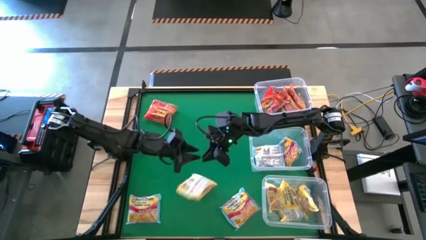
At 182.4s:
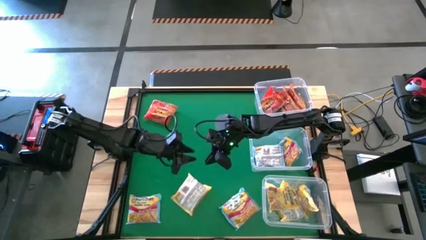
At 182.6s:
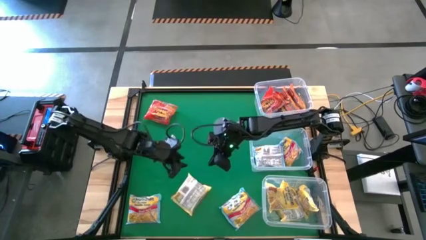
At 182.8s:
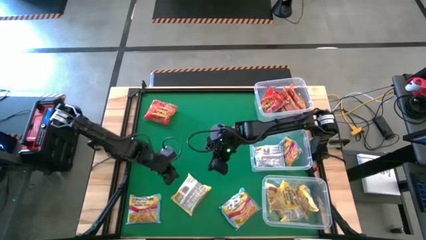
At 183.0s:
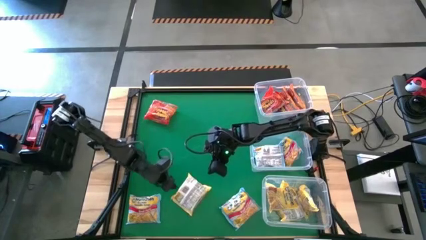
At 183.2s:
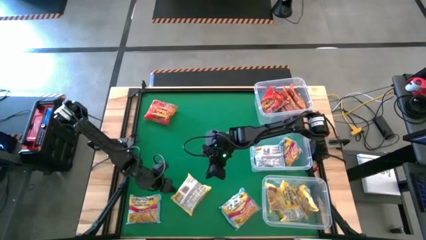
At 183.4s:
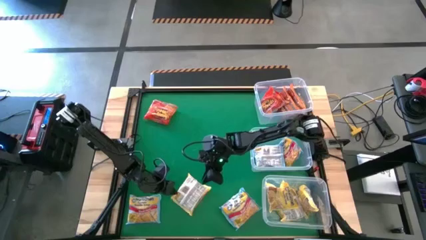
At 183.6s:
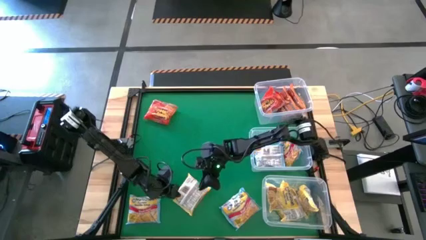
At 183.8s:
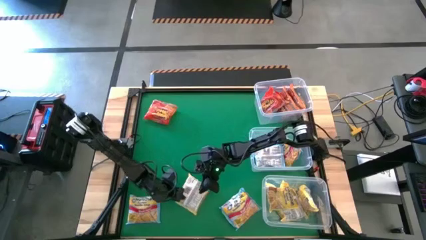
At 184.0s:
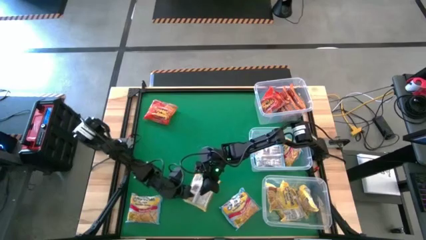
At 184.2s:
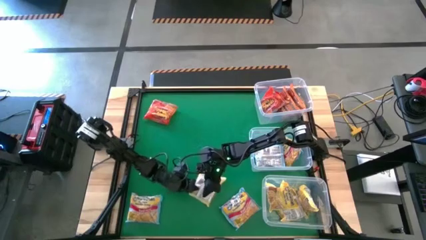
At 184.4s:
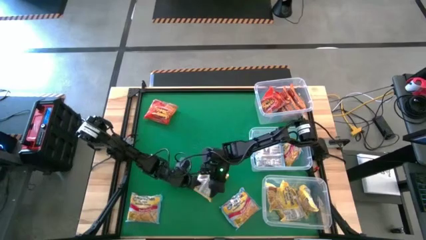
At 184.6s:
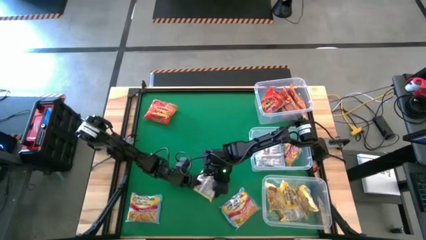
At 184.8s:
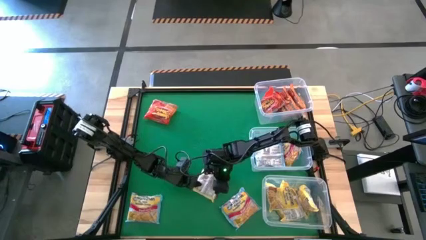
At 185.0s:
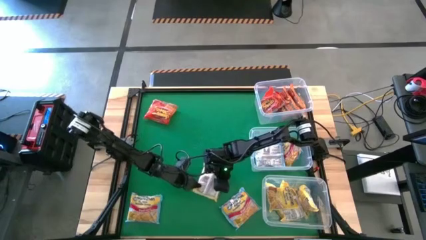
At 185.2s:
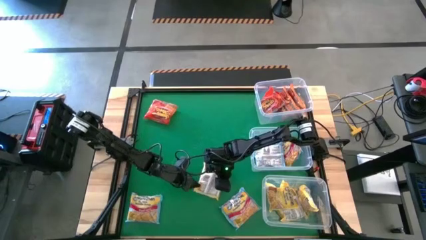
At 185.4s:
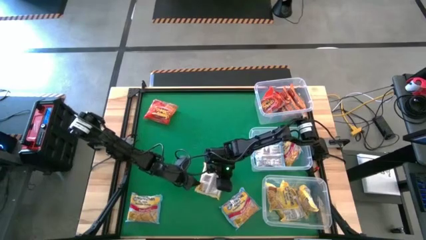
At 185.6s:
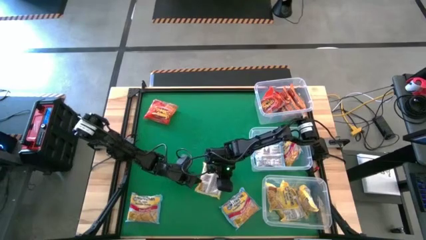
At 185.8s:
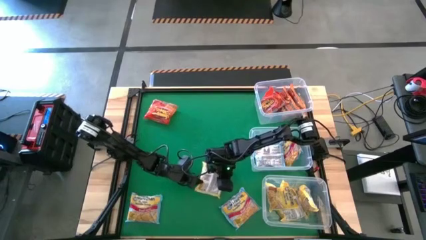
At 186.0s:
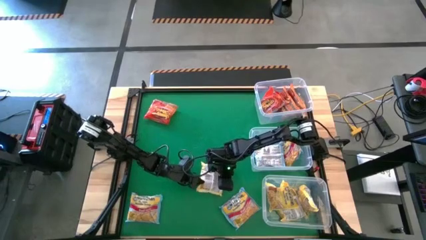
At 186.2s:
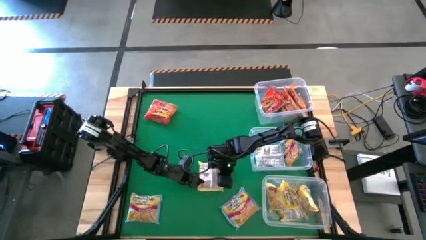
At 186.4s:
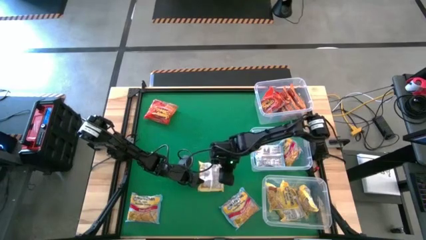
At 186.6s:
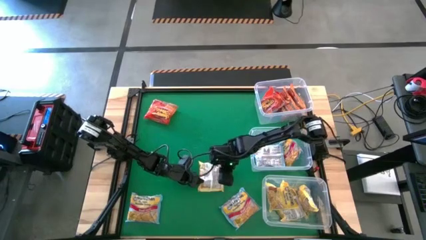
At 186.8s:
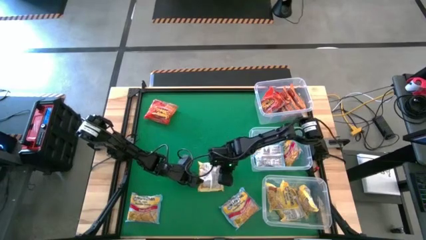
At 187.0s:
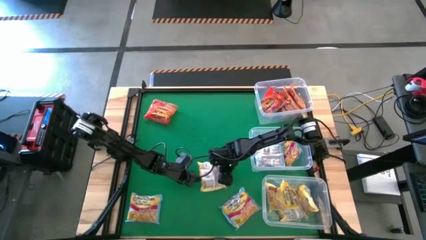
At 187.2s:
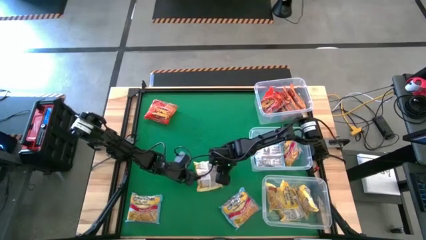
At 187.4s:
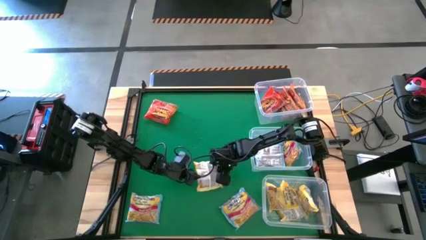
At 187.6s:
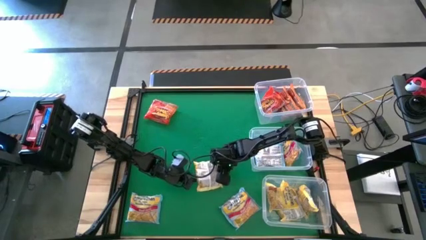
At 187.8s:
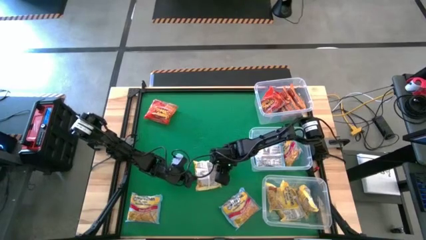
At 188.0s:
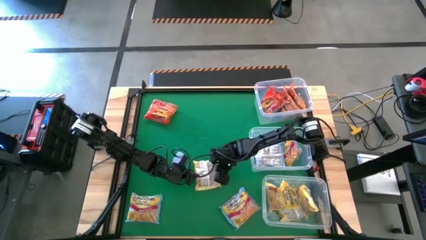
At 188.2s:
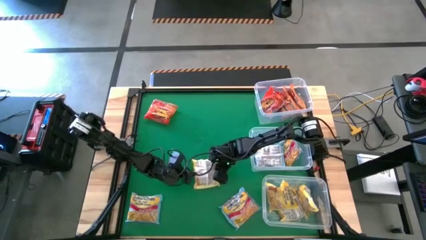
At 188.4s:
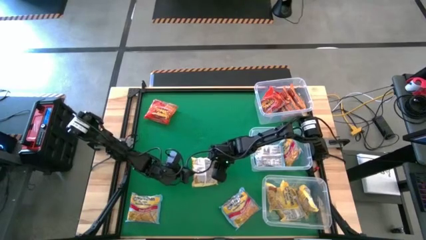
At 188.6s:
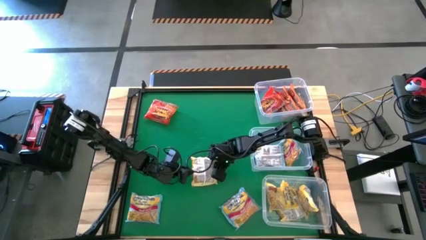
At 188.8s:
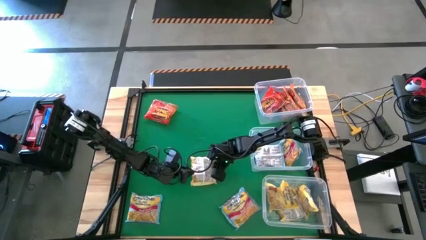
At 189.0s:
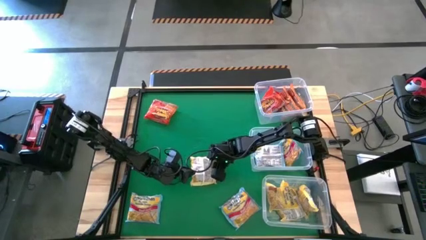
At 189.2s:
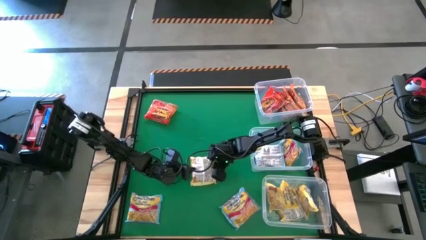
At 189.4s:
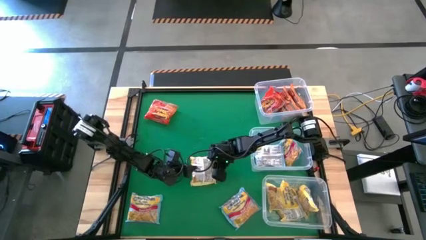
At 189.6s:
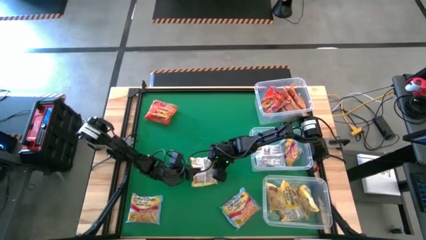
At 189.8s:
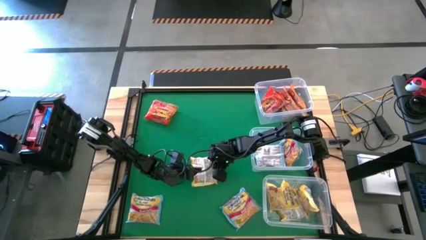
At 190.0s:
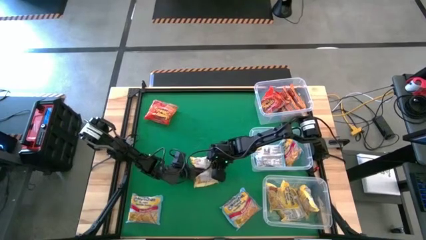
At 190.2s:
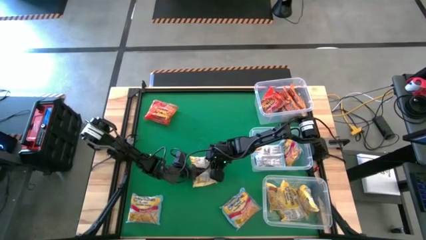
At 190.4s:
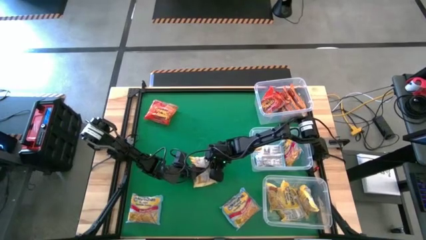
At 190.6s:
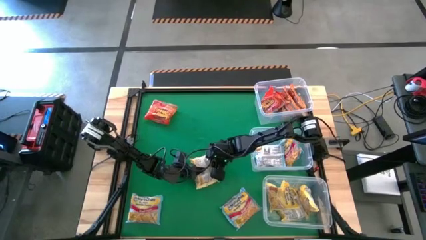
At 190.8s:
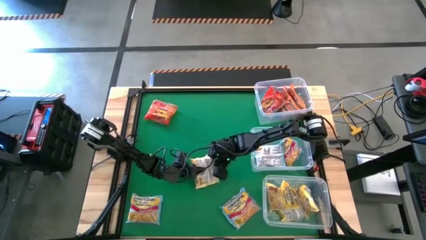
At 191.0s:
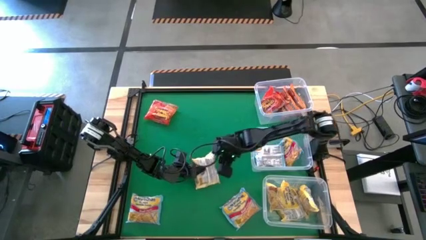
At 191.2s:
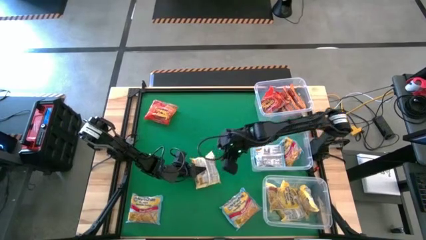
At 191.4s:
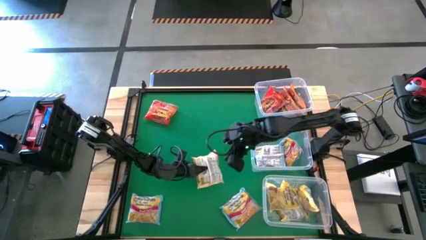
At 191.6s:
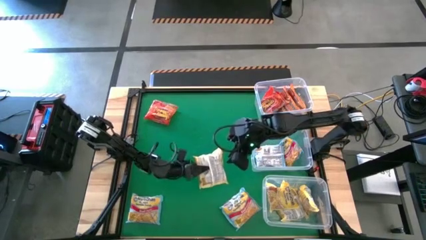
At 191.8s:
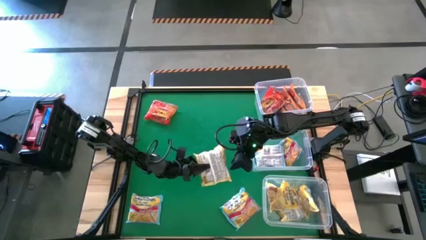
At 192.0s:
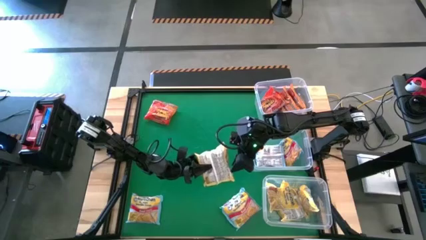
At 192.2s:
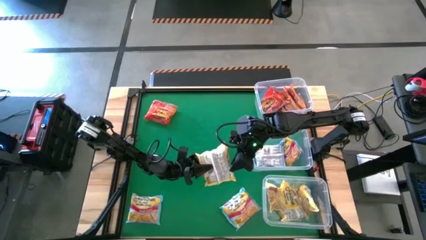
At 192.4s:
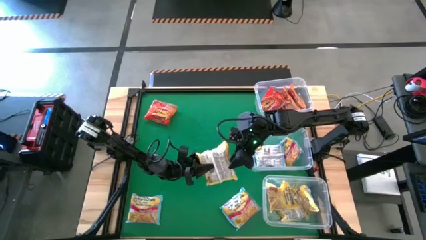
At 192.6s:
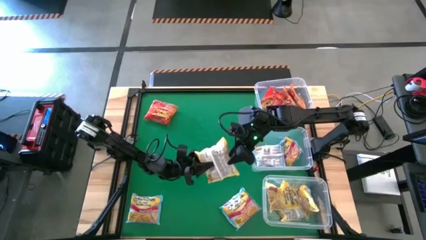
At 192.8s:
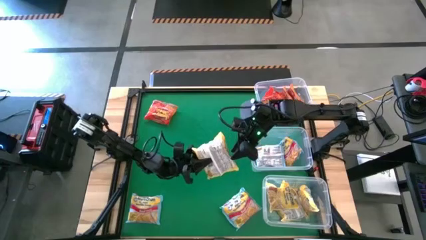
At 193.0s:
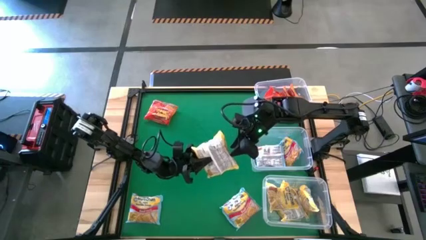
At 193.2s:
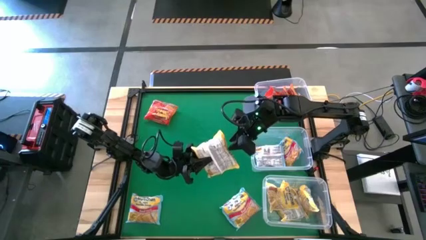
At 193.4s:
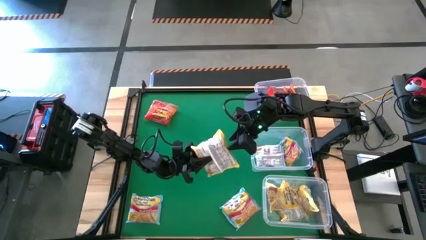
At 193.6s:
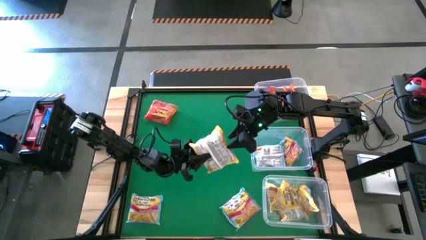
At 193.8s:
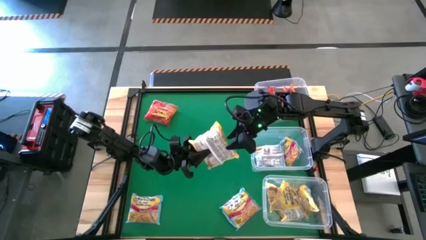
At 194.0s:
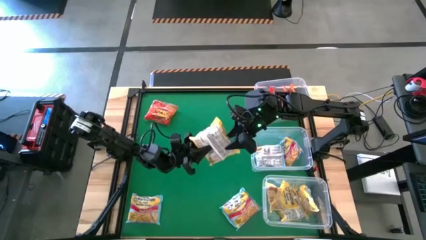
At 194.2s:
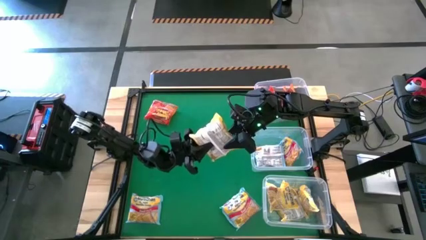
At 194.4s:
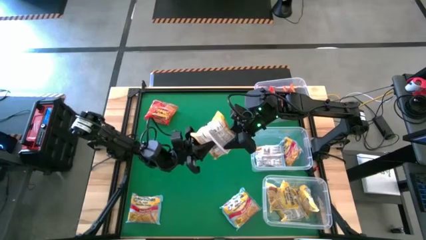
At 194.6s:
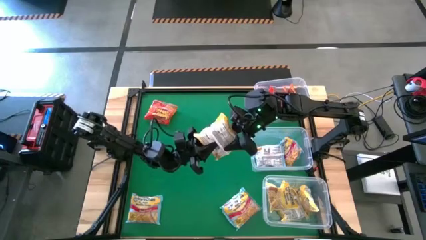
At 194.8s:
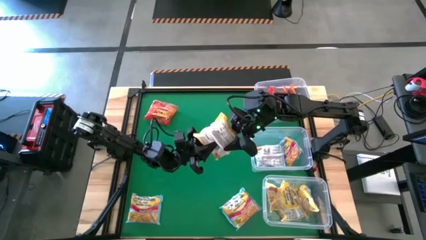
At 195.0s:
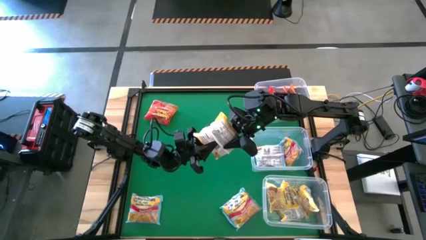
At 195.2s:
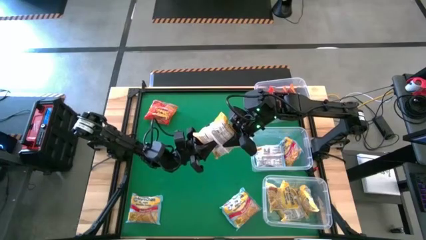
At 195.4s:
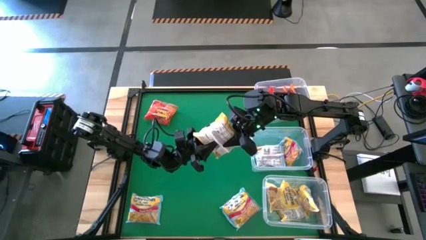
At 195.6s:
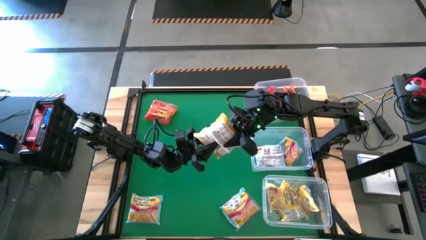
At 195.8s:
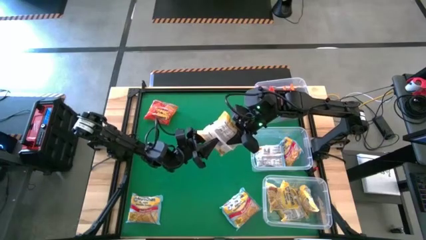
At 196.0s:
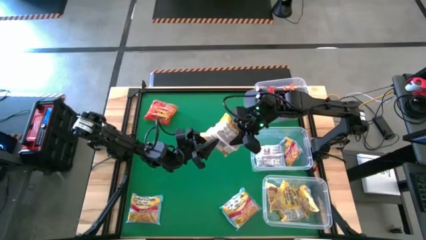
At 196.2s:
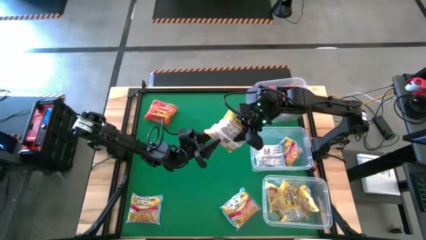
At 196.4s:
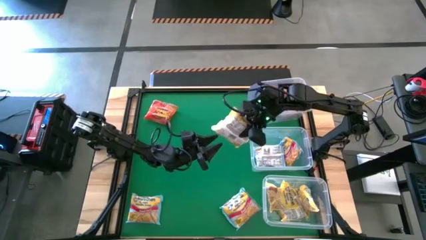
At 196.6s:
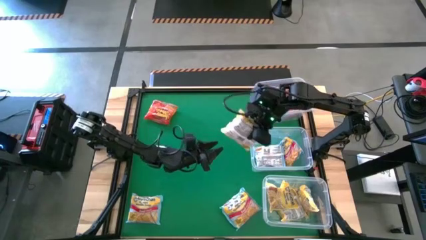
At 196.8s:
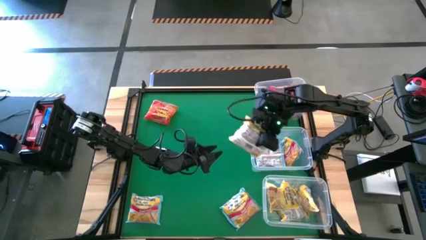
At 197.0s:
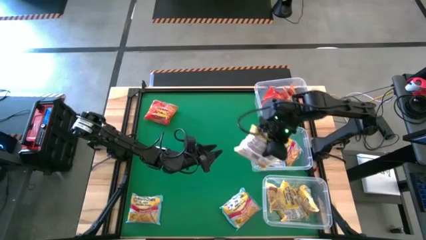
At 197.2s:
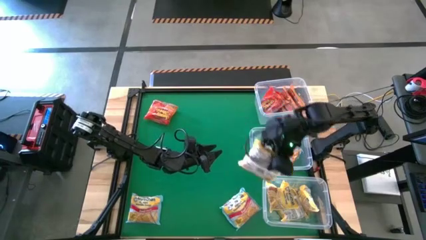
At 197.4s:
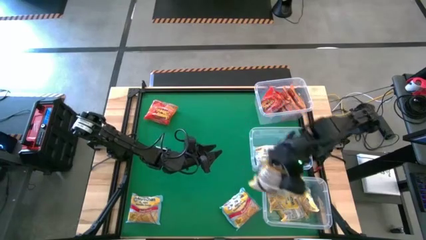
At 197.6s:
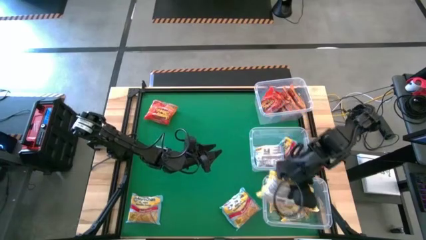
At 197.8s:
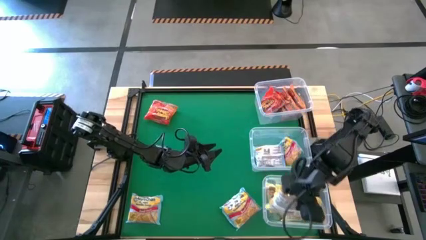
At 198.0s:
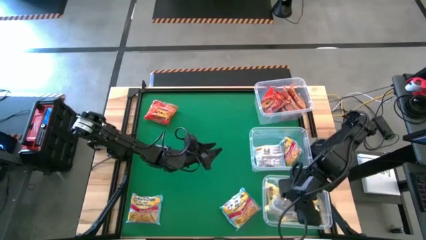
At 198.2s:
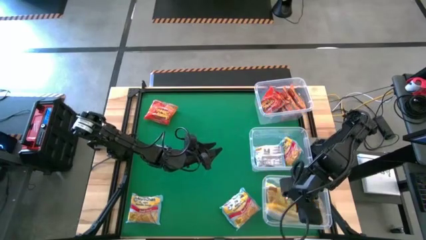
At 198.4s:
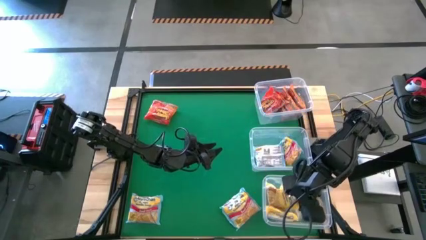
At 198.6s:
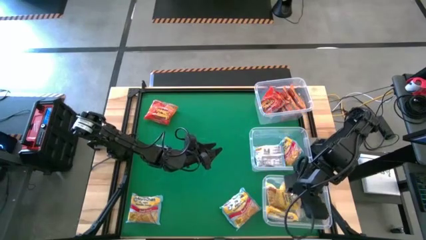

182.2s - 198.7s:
Task: Sort Maruchan noodles
Put the center yellow noodle pack into the bottom transparent bin

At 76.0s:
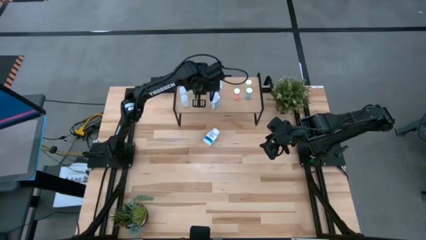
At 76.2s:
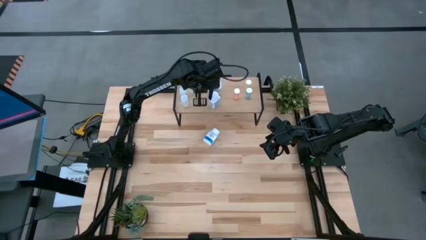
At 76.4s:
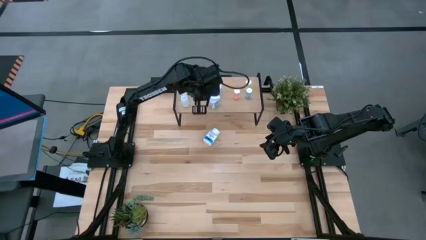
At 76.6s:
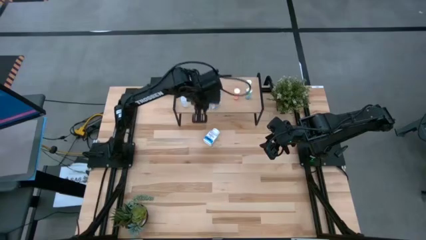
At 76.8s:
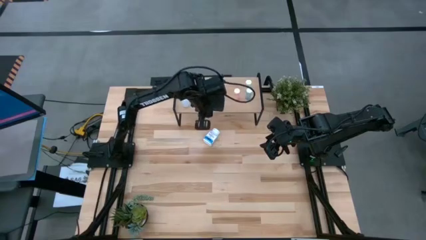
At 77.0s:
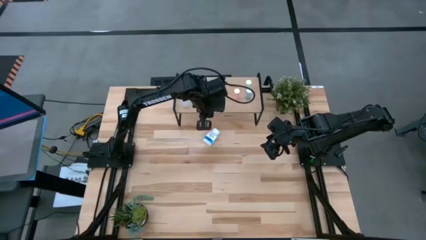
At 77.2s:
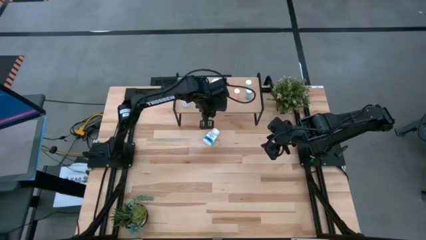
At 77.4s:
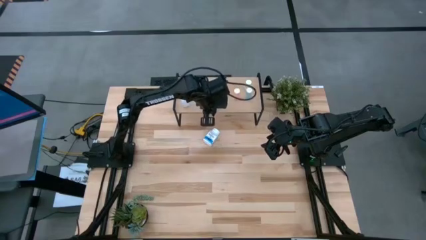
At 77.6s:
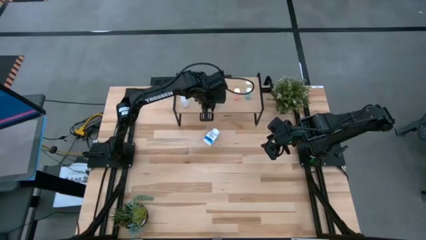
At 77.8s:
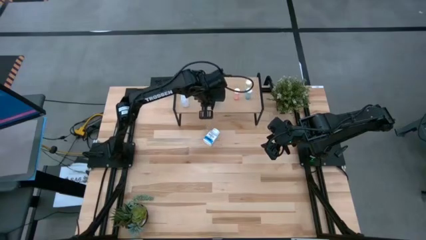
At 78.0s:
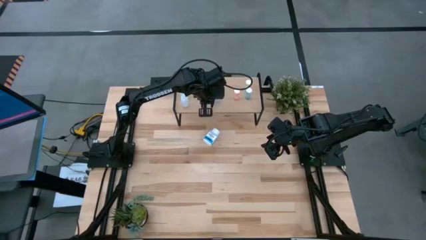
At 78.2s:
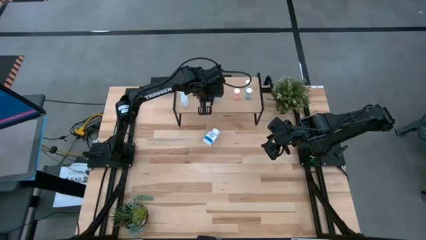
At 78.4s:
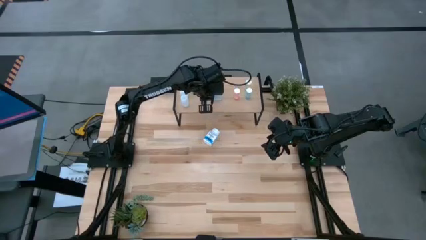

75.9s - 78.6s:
Task: Pick and place medicine bottles onto shelf by color
Adjust the white medicine bottle on the shelf
